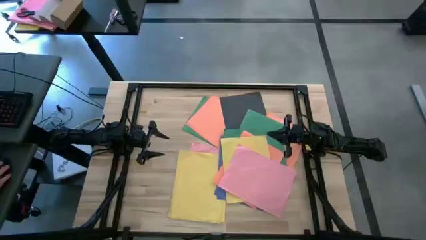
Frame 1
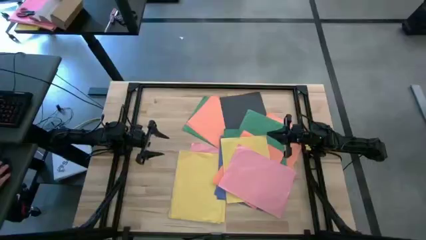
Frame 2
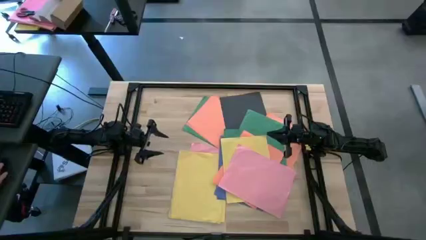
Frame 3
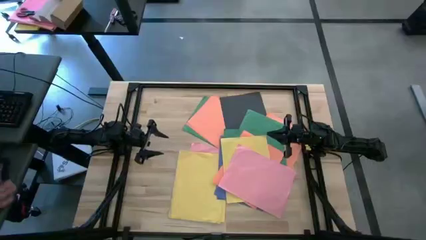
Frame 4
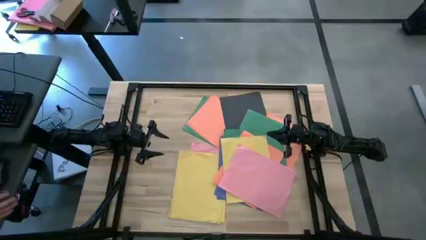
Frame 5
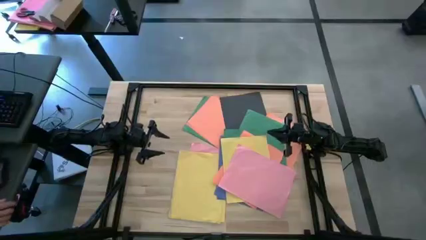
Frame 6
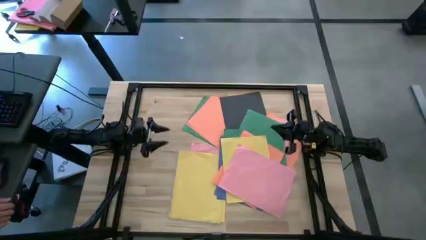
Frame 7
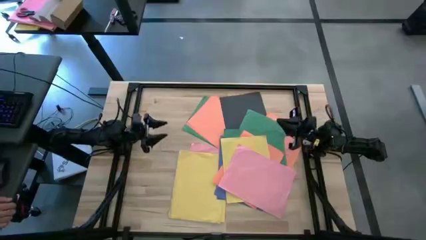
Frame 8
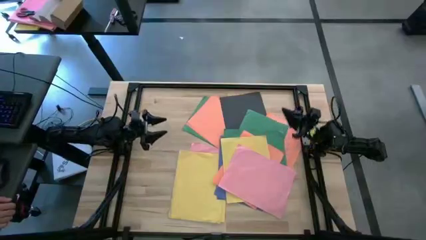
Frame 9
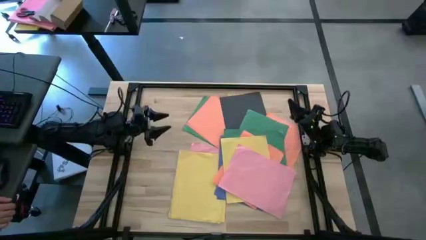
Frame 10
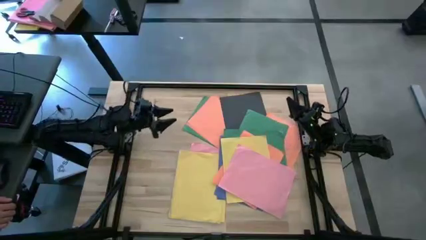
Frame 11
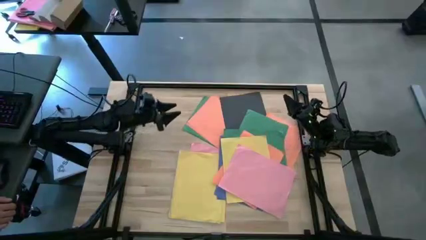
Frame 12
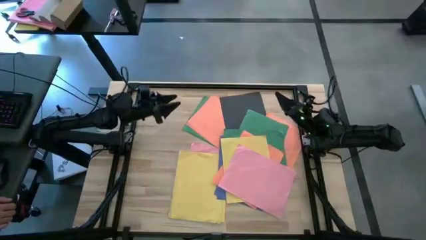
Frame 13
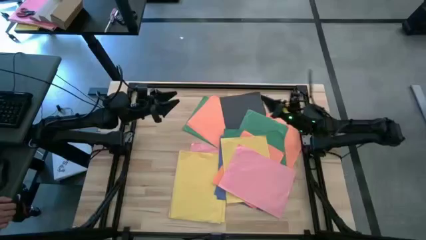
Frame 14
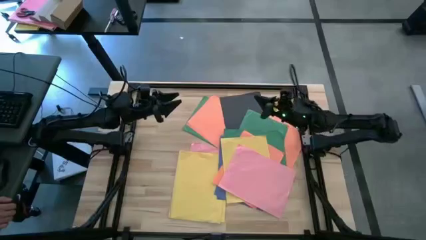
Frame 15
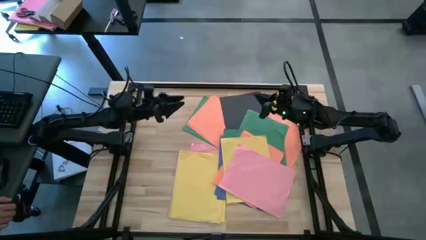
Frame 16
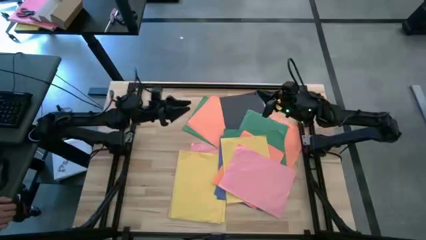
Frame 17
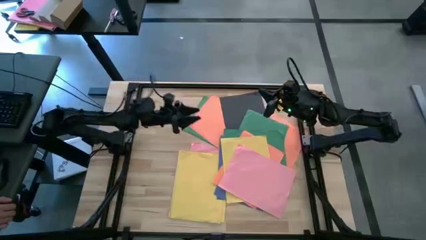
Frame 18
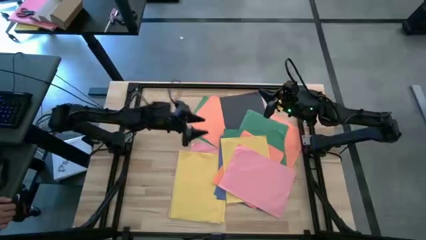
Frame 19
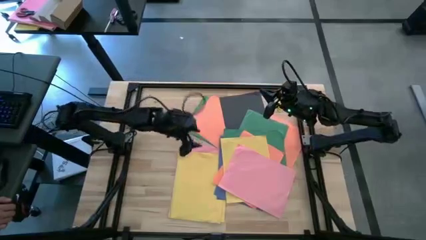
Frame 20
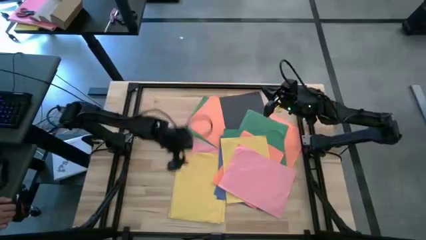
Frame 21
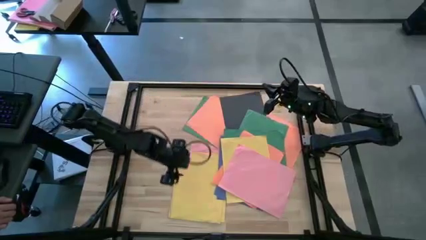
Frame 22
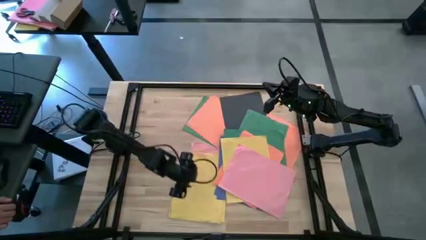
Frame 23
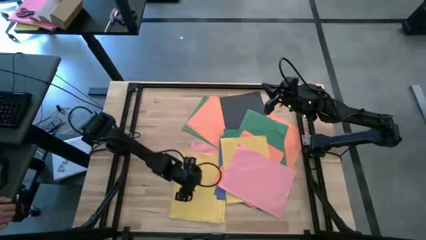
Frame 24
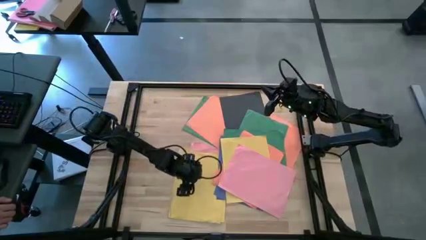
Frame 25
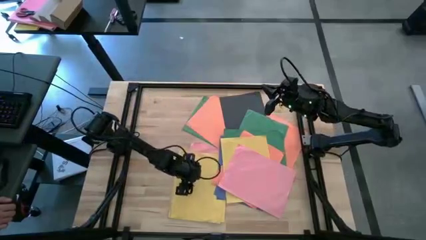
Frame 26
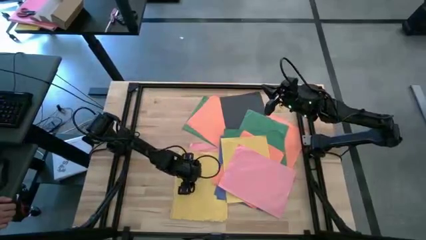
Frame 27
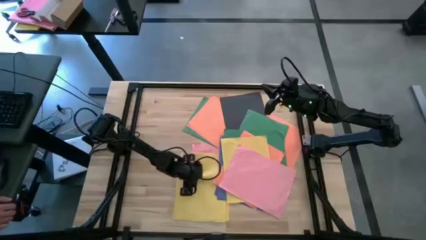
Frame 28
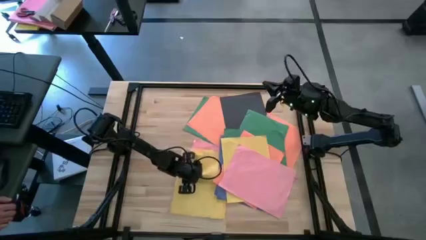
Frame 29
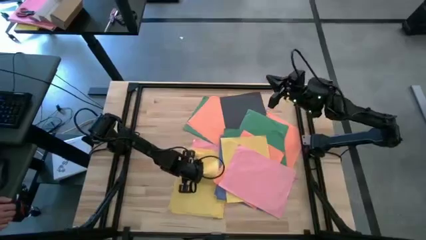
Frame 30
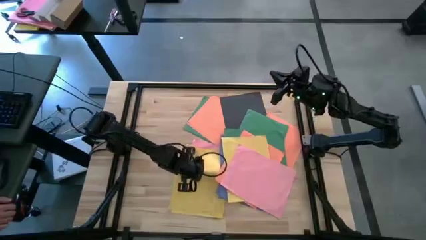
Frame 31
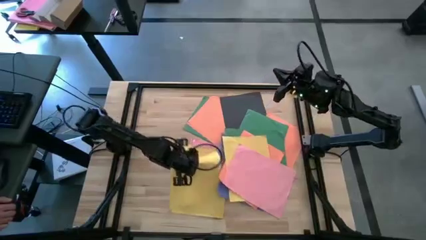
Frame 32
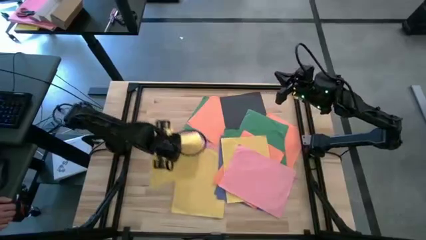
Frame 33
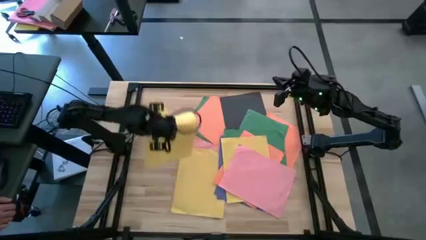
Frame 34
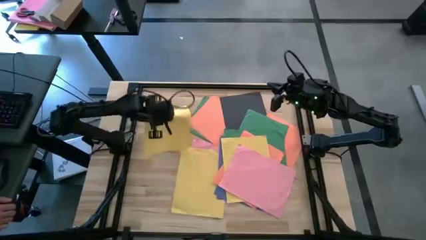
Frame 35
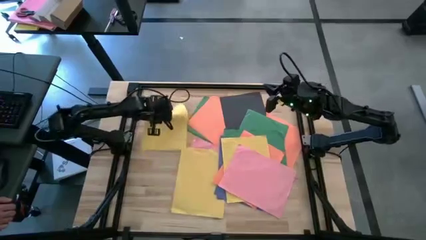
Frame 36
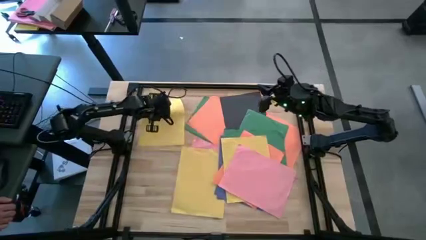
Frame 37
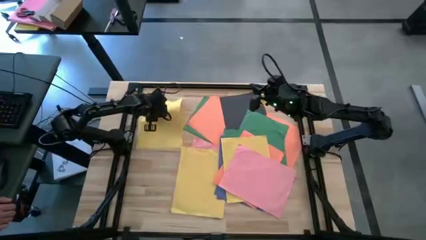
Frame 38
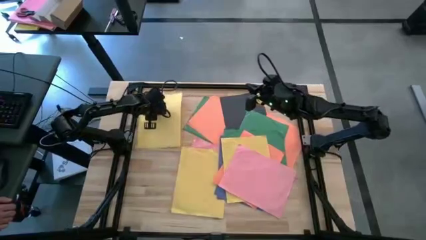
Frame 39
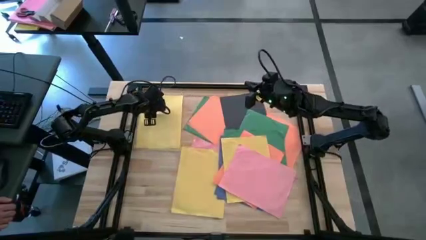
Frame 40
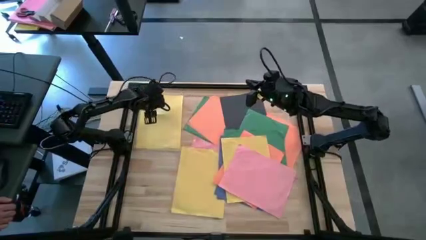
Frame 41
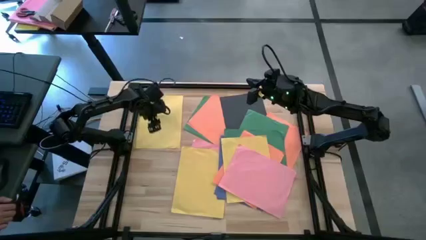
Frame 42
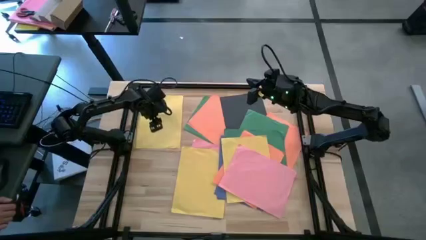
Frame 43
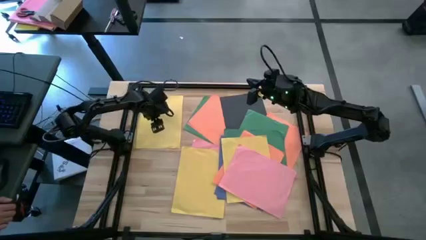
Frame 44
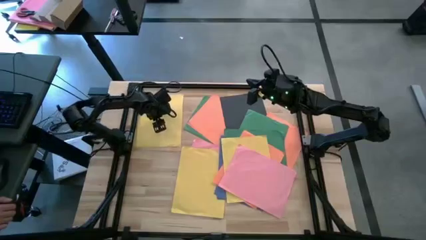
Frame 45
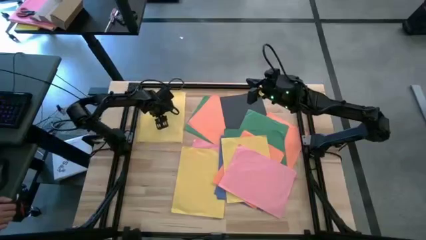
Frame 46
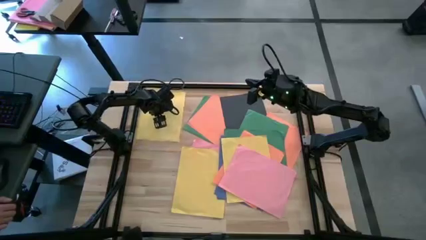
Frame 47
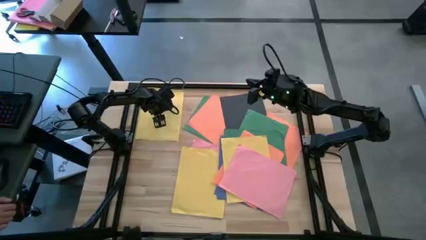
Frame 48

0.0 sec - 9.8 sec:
Task: Organize paper
Move the yellow paper to the top left of the table

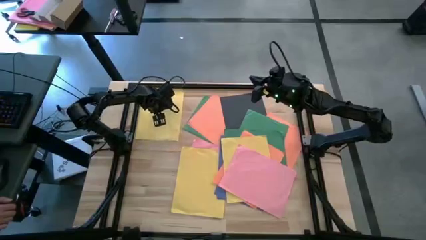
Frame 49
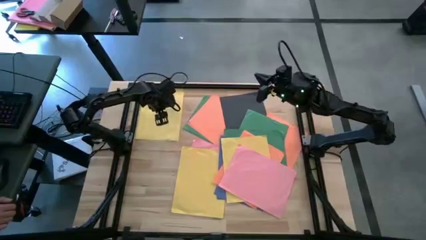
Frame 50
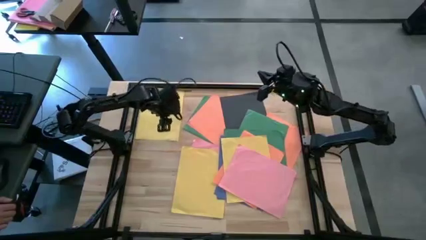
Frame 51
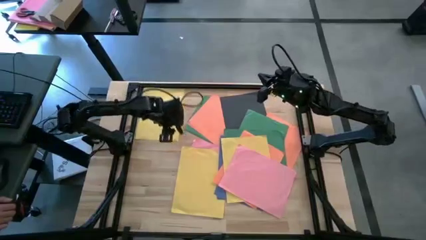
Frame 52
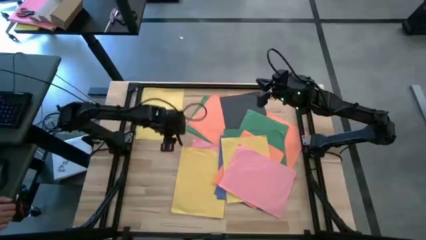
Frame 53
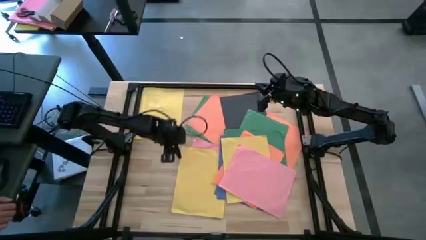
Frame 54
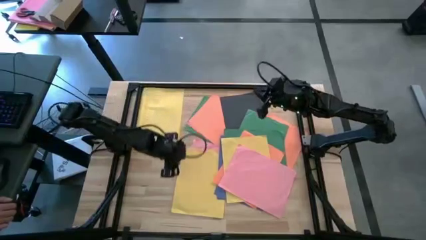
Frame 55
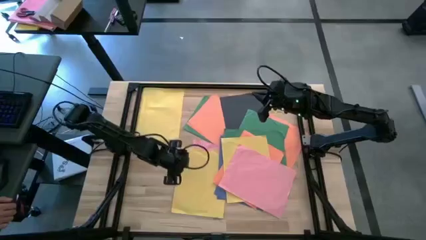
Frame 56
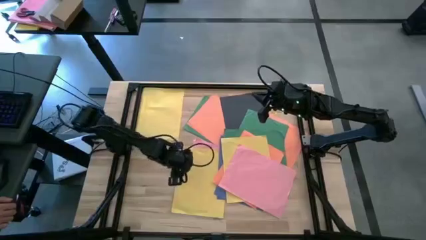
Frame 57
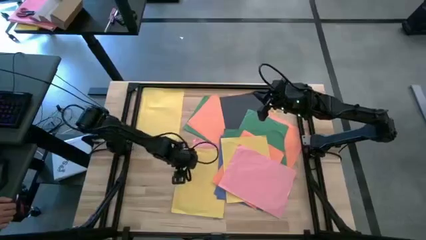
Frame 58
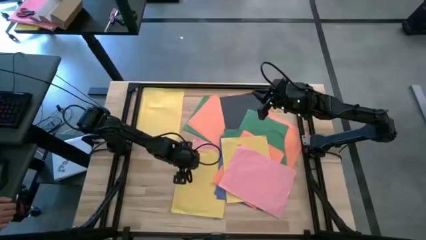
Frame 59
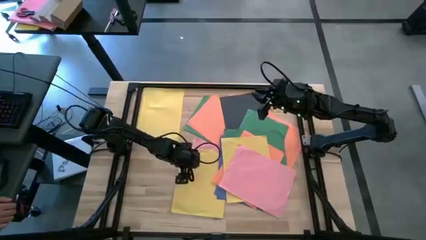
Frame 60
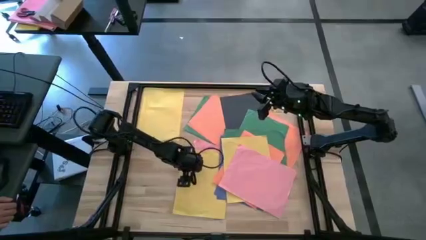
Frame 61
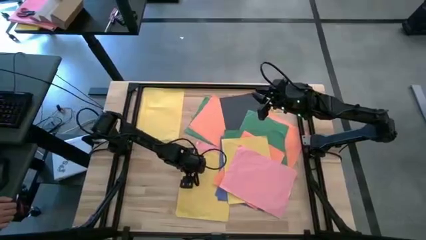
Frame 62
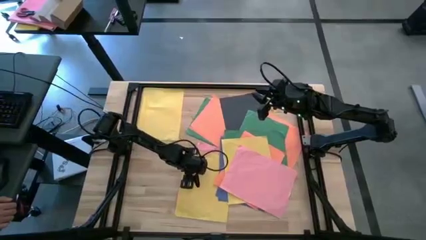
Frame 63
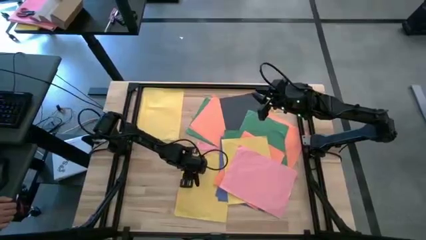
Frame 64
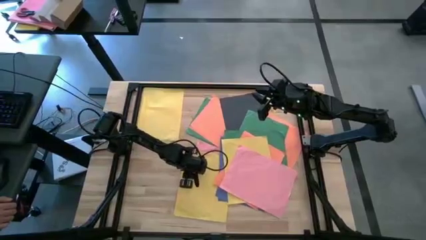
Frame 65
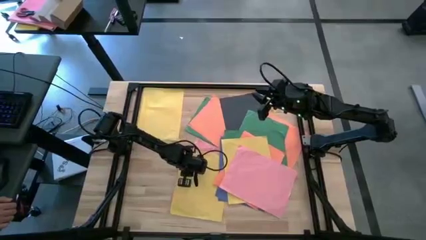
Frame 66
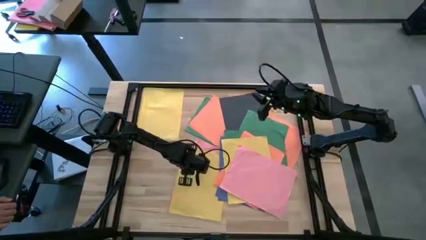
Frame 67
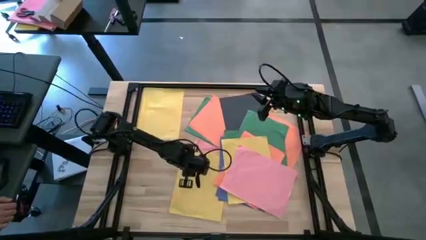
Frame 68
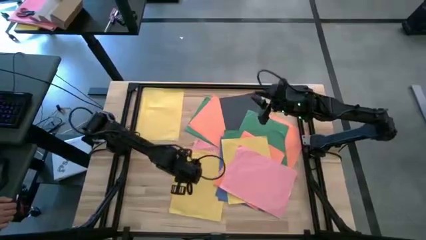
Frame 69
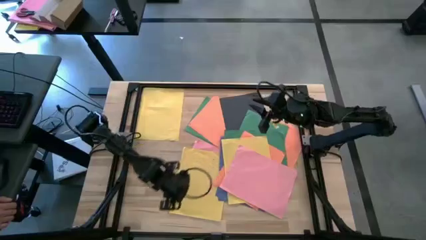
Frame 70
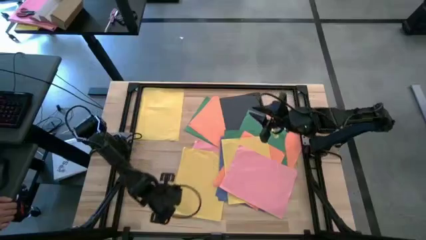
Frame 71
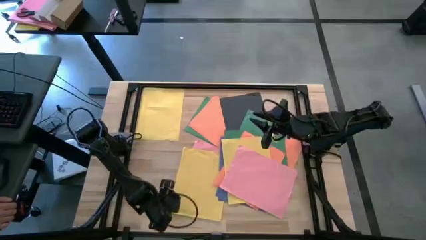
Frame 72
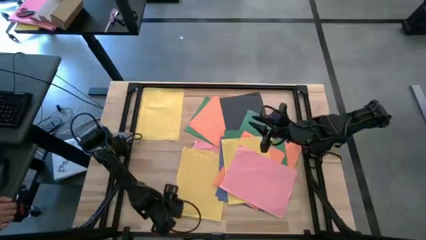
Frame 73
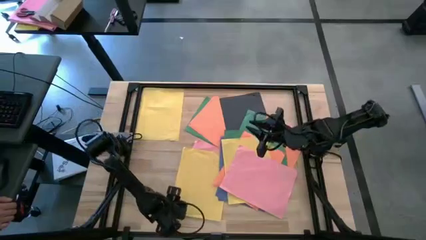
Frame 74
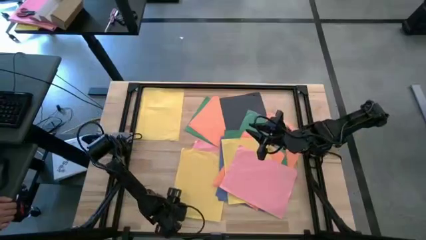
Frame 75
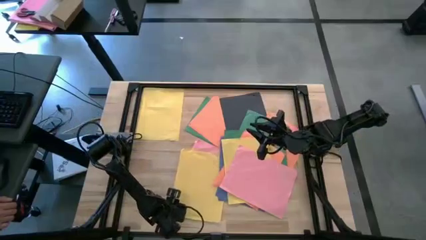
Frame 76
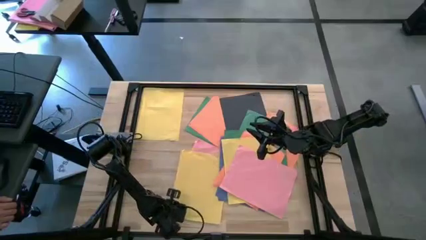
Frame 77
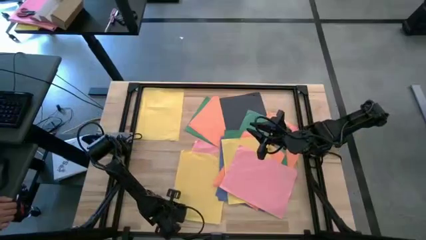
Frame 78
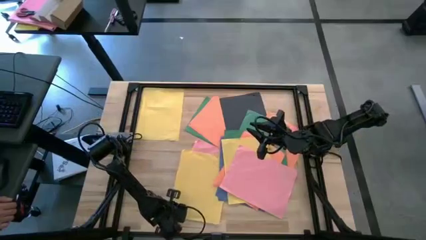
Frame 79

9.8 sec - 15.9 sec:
Stack the yellow paper on top of the other yellow paper
